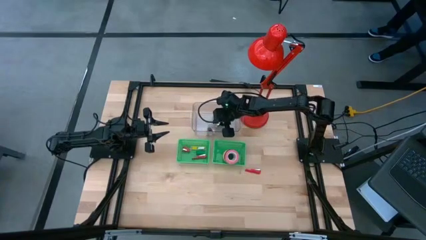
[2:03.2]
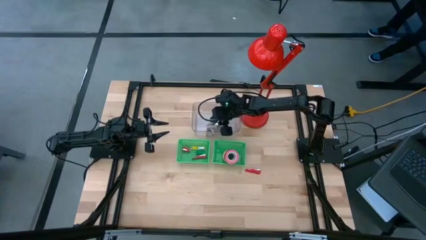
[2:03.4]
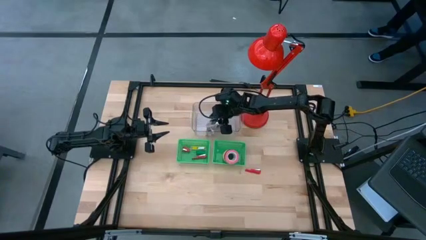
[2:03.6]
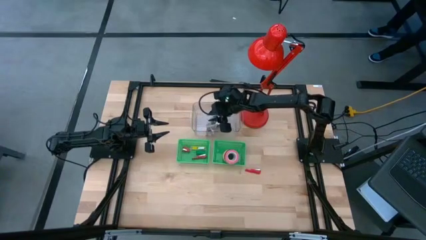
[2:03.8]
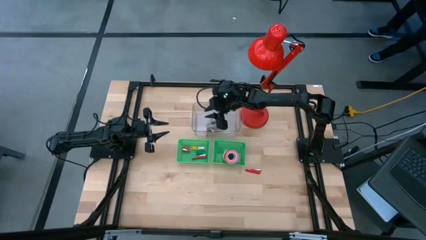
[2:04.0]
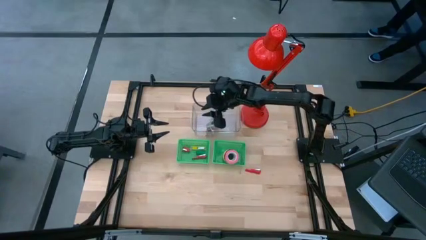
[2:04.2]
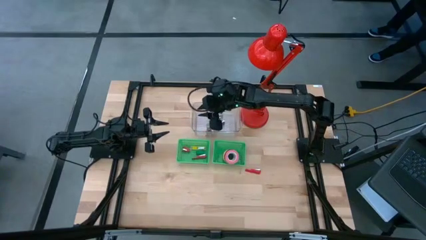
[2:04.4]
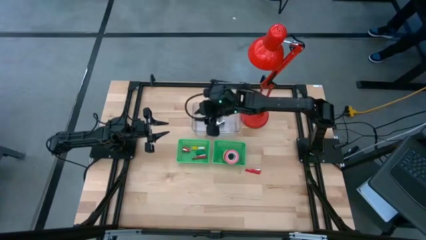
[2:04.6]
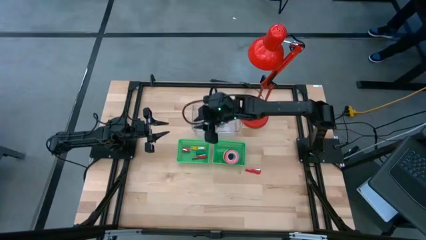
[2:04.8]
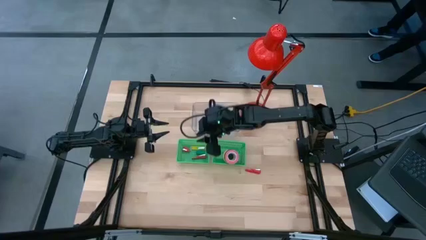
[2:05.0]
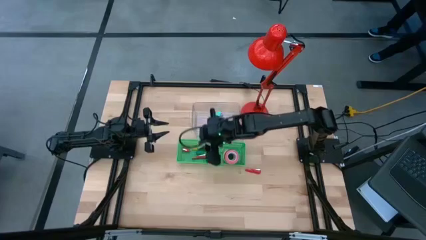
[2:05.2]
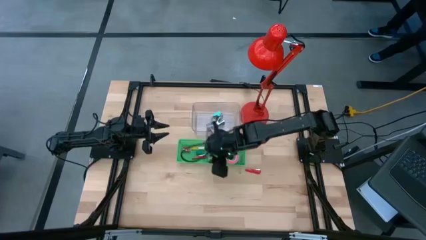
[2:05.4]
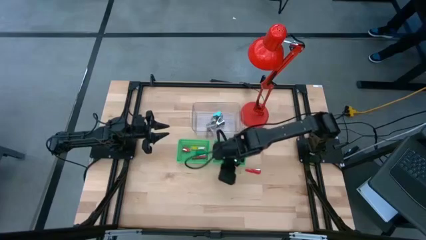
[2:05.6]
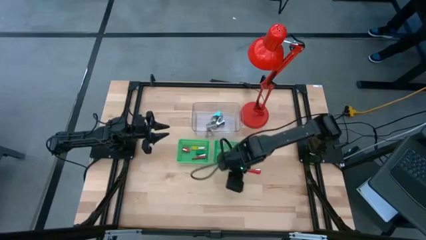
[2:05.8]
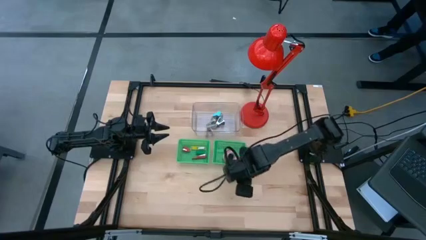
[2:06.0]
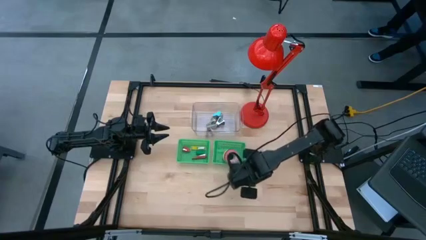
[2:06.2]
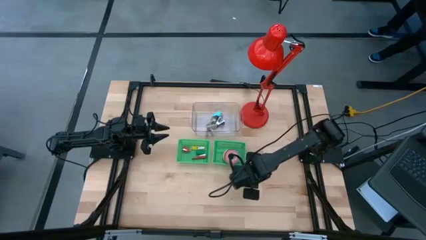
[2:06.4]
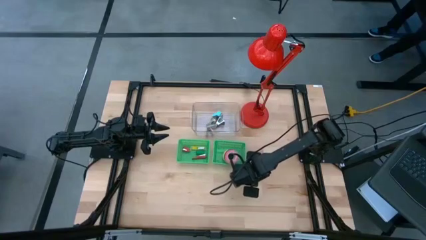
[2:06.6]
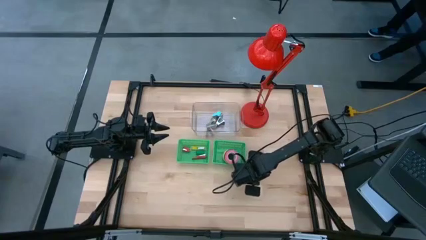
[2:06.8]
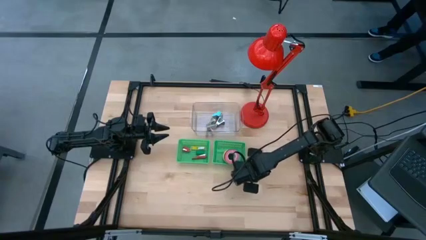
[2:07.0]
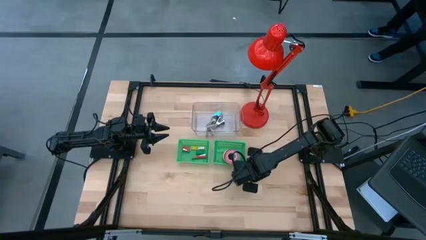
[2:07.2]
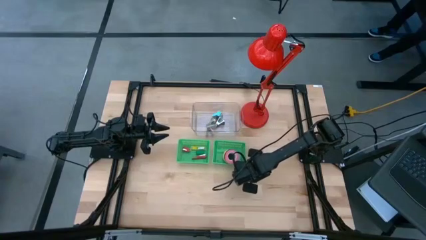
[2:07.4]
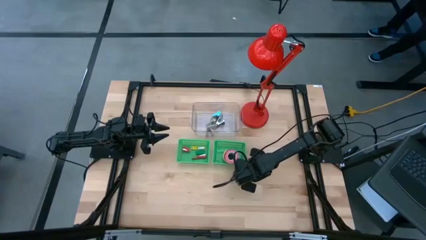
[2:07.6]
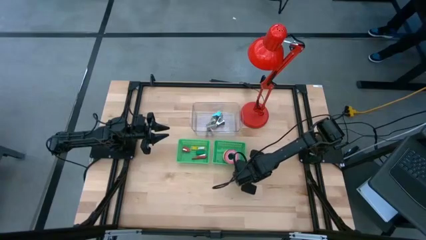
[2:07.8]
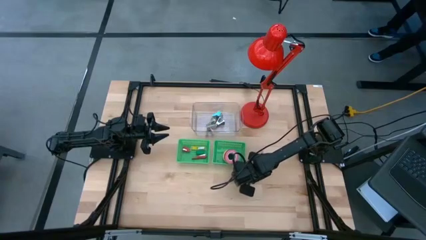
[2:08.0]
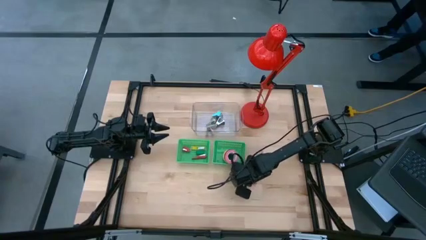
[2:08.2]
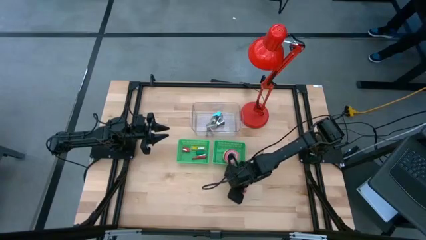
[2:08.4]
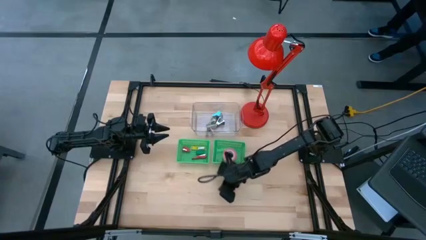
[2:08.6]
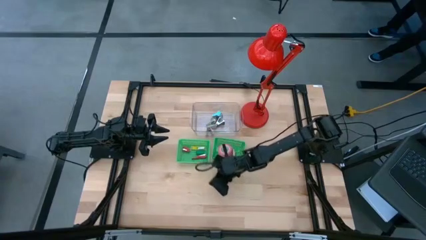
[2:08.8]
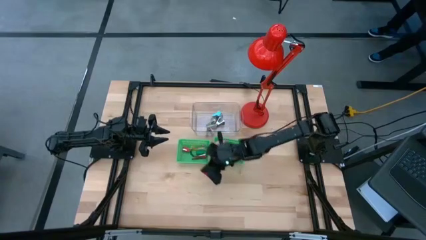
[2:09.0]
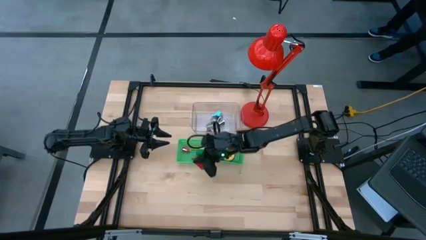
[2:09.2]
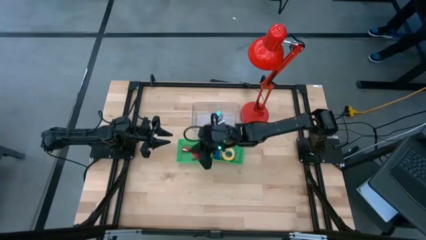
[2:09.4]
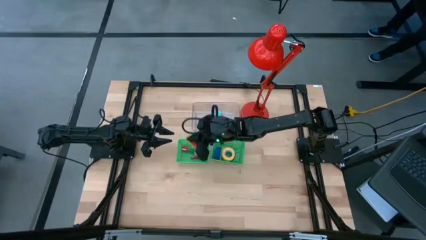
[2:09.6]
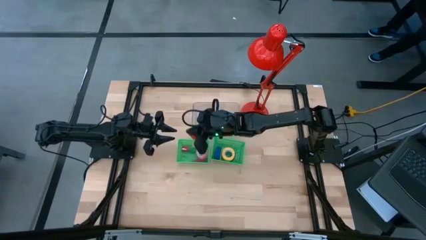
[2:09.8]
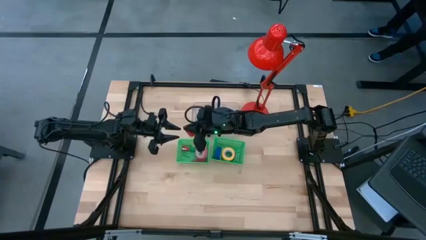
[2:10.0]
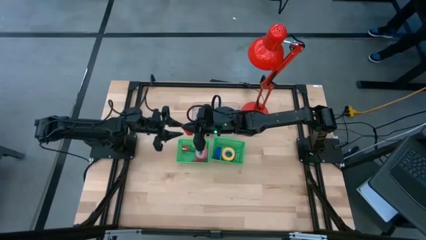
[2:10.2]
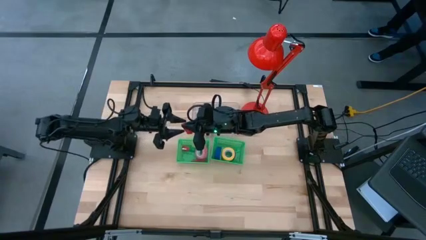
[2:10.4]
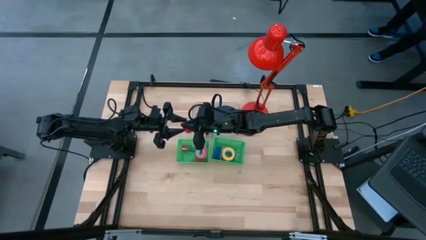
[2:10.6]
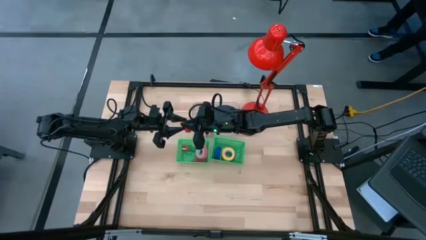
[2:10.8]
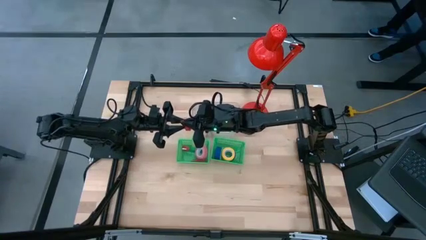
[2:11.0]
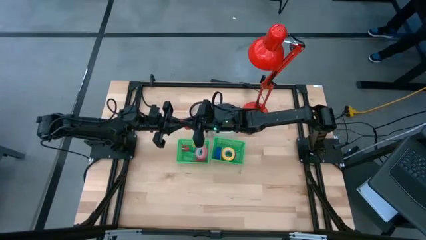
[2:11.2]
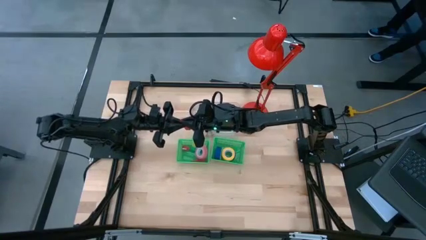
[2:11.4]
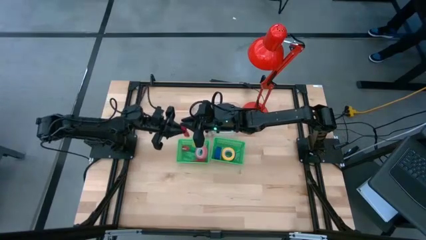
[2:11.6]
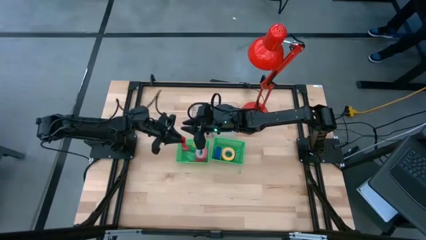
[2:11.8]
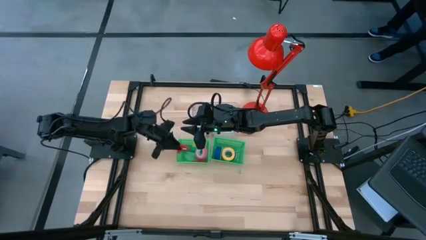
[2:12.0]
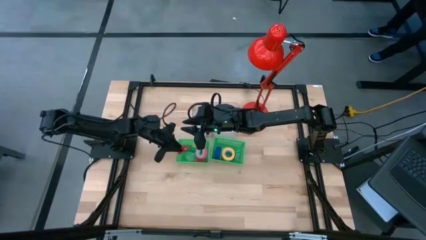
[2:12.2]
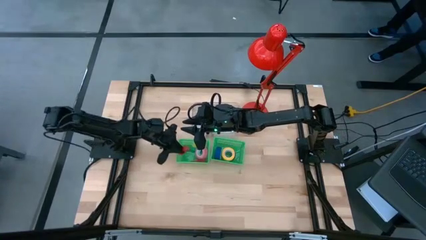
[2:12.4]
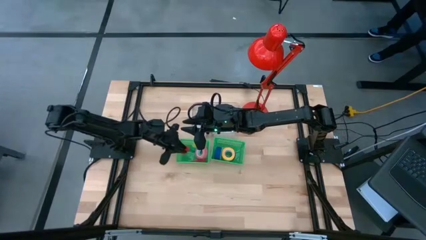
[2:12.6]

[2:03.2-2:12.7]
Task: Pick and place Stapler, Stapler remover, tape
Put the red stapler into the left green bin

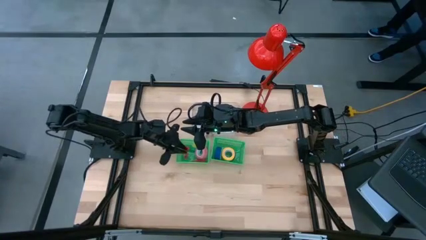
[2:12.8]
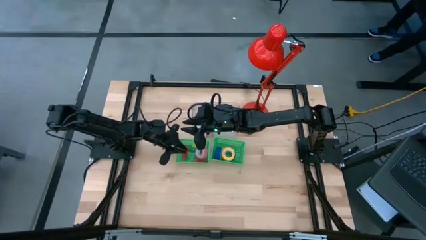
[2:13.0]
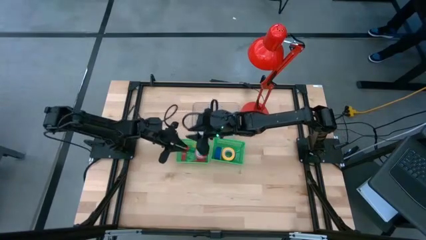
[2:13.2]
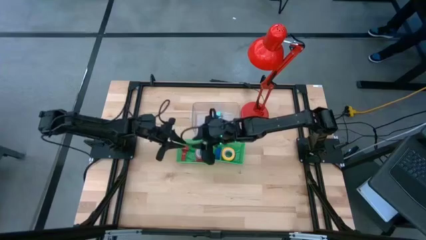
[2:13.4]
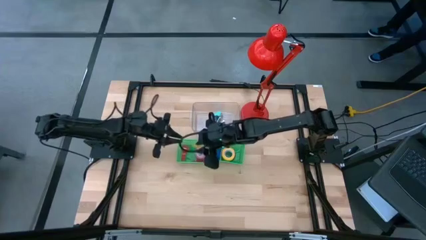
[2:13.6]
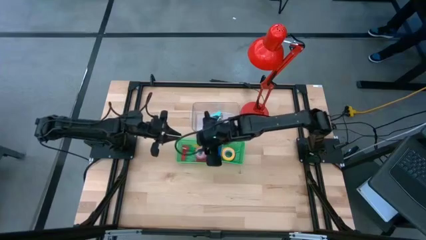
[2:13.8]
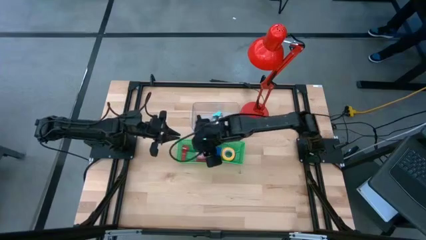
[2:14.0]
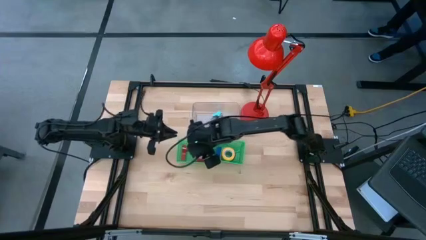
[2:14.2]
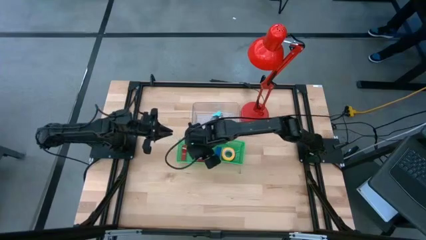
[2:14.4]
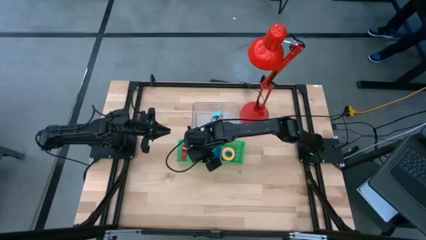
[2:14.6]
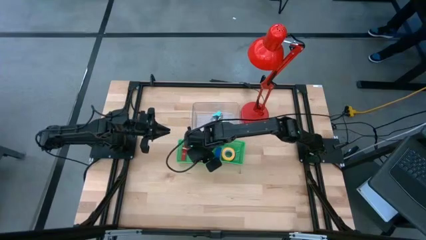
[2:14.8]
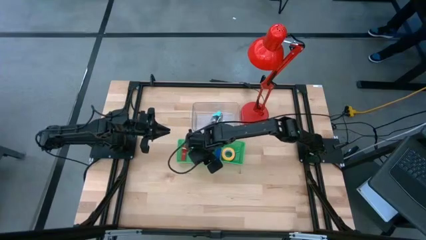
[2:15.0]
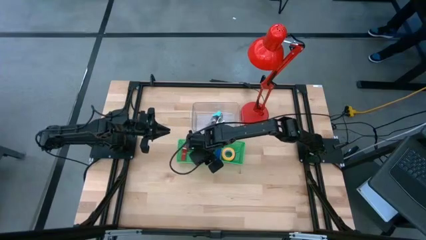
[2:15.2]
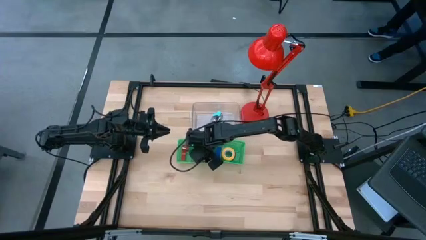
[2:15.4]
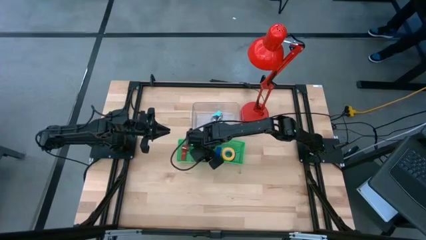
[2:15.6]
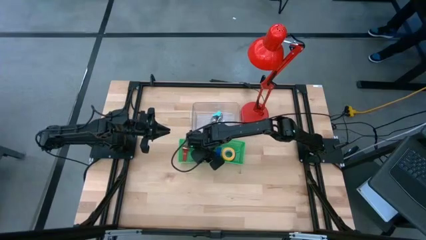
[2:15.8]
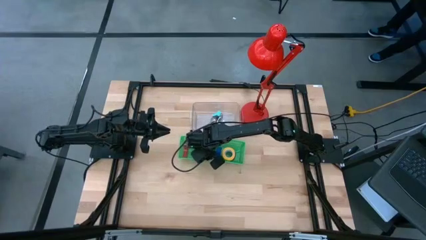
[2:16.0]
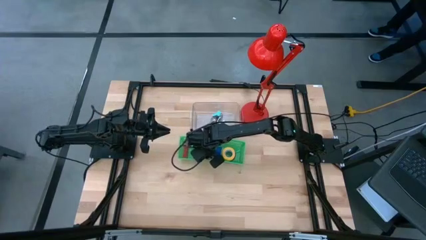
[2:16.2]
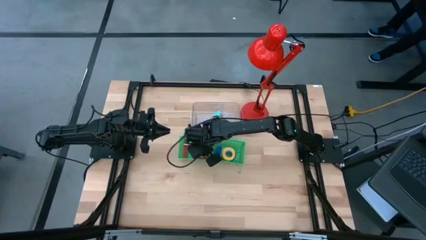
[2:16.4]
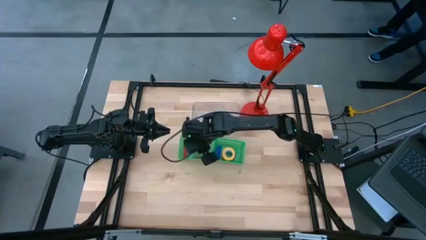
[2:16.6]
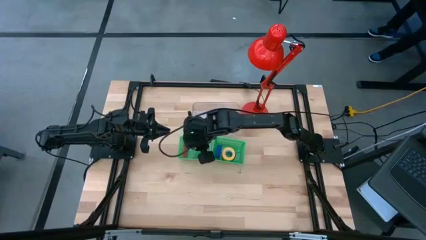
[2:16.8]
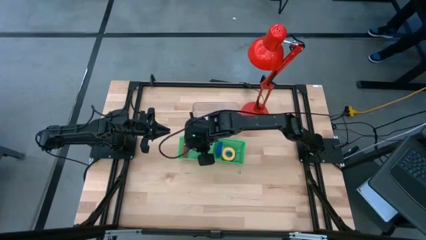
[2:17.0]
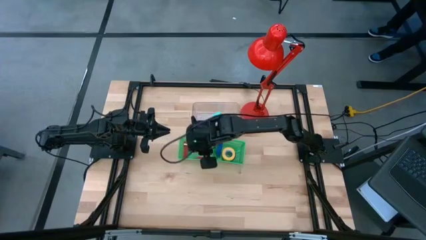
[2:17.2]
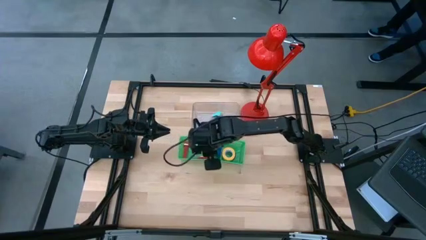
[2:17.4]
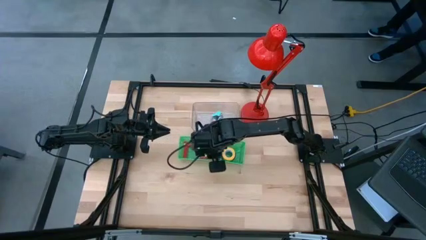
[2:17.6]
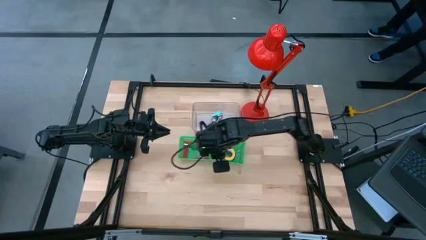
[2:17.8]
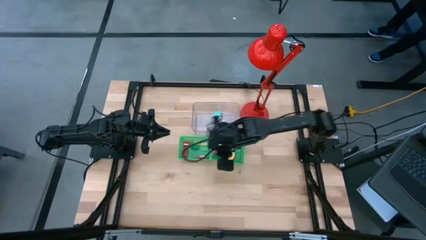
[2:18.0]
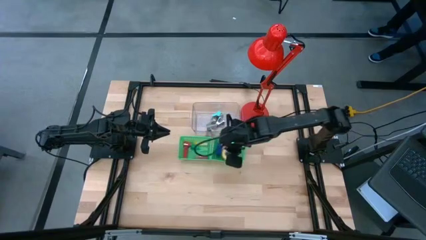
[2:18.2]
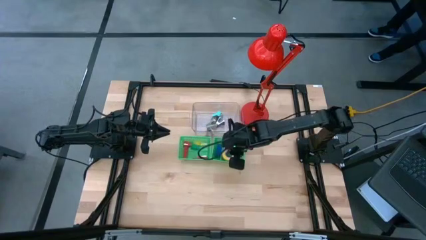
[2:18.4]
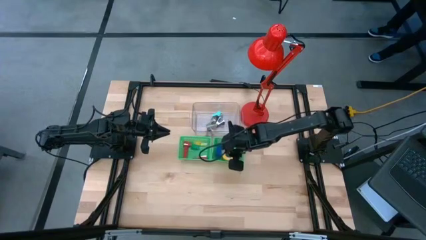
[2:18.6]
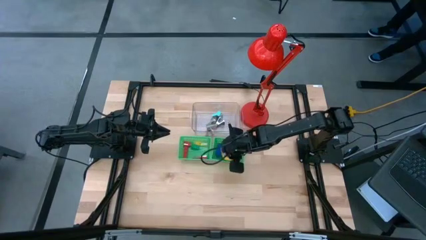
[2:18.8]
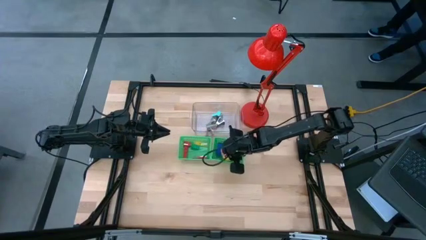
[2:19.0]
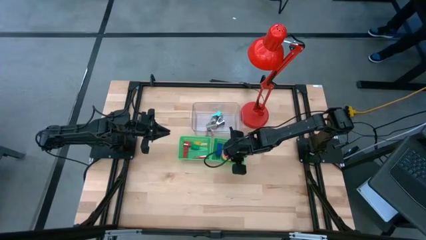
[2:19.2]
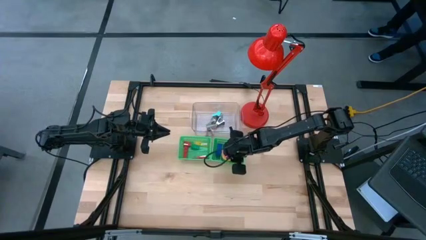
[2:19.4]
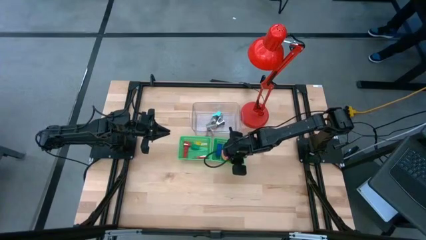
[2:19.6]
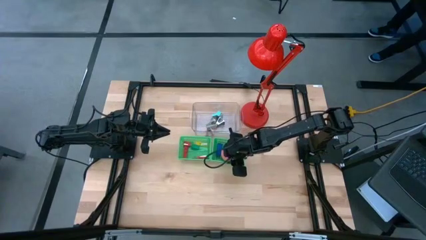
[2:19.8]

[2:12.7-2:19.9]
Put the pink tape into the right green bin
